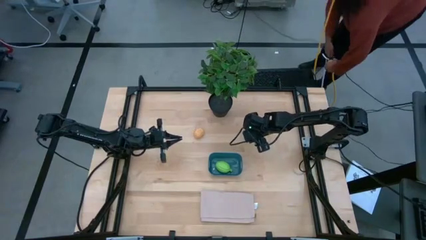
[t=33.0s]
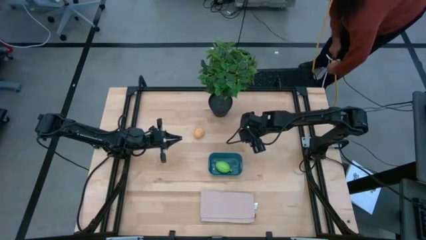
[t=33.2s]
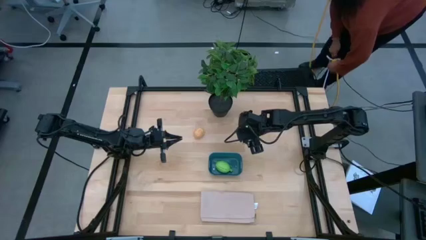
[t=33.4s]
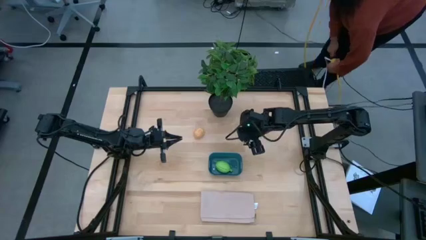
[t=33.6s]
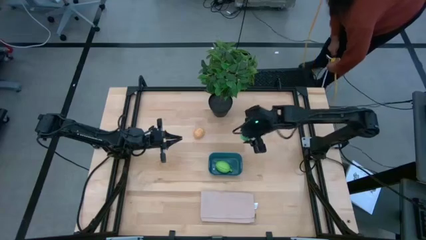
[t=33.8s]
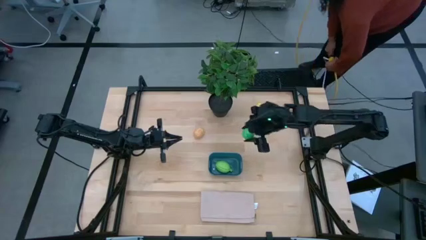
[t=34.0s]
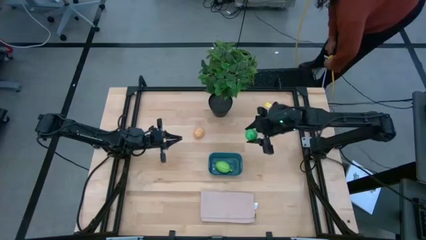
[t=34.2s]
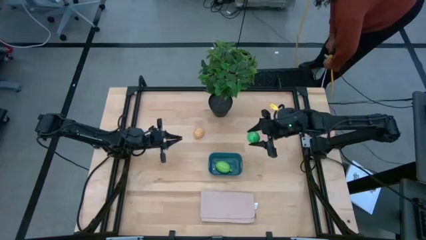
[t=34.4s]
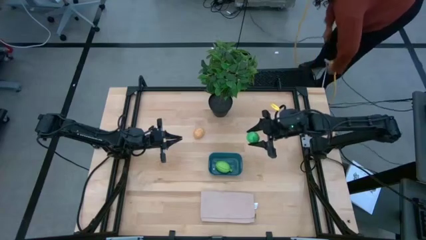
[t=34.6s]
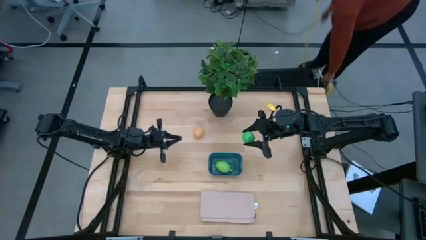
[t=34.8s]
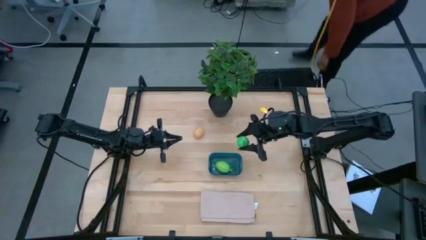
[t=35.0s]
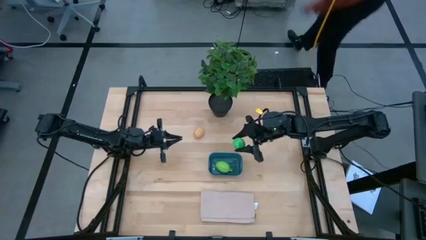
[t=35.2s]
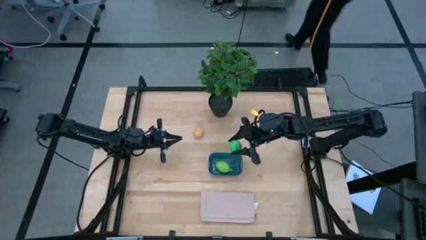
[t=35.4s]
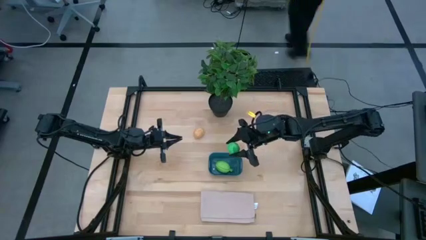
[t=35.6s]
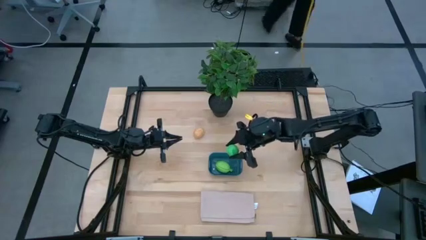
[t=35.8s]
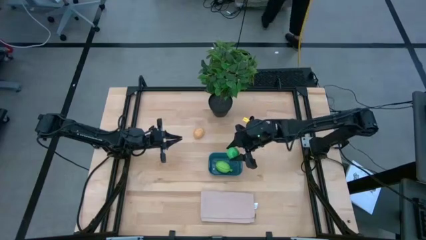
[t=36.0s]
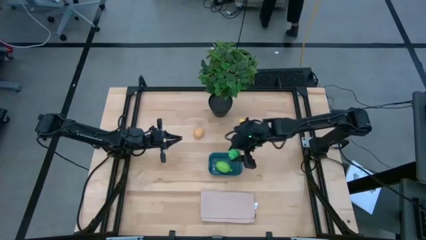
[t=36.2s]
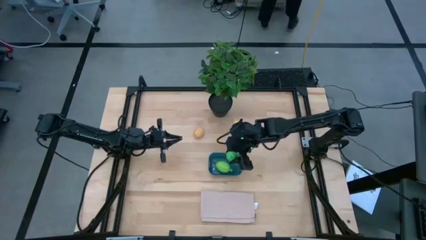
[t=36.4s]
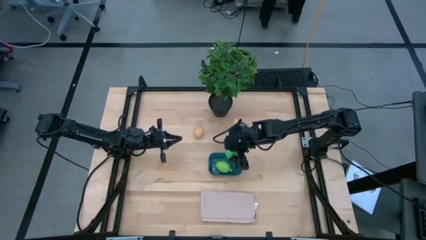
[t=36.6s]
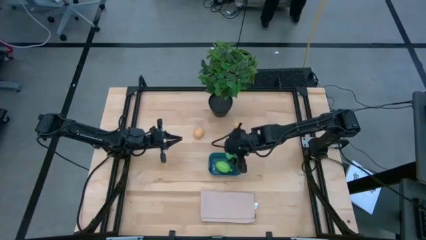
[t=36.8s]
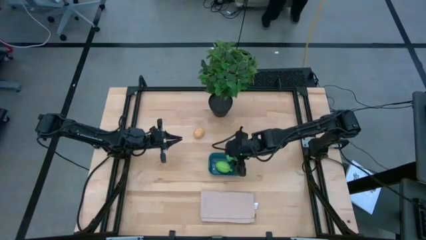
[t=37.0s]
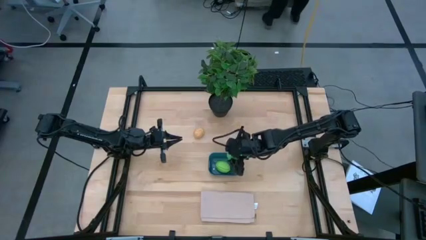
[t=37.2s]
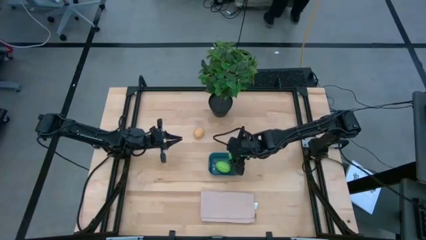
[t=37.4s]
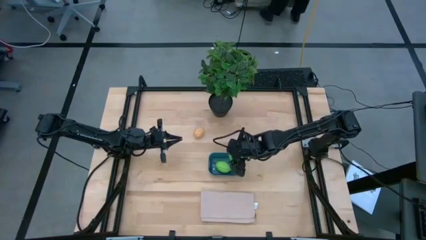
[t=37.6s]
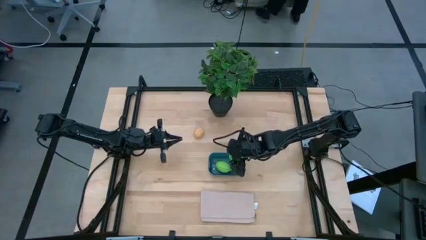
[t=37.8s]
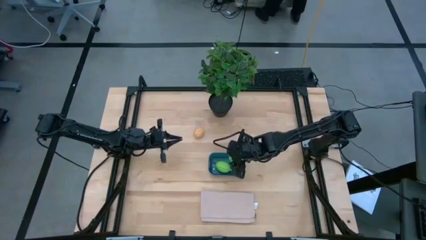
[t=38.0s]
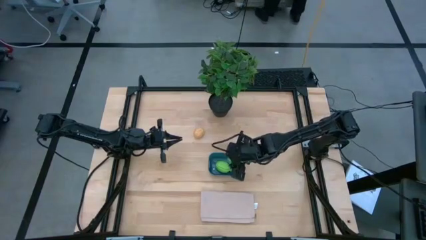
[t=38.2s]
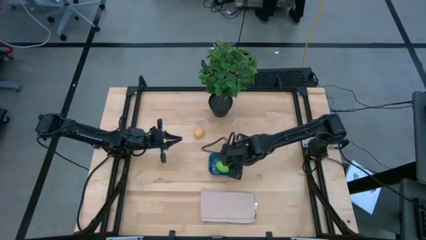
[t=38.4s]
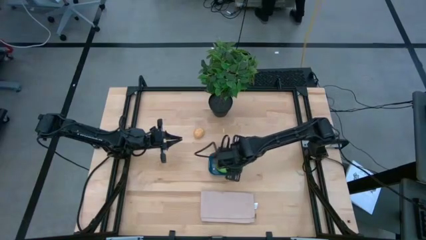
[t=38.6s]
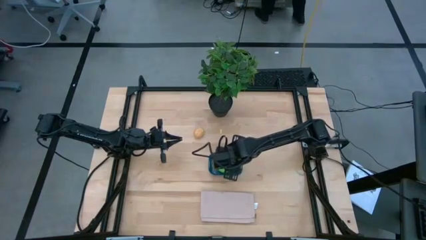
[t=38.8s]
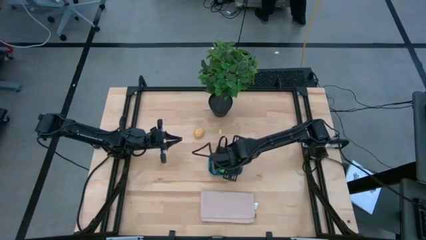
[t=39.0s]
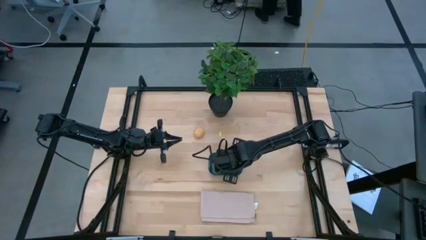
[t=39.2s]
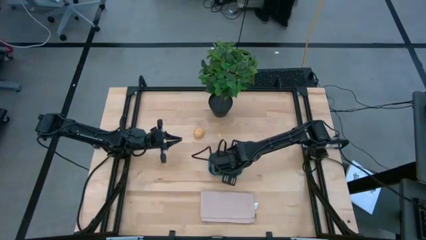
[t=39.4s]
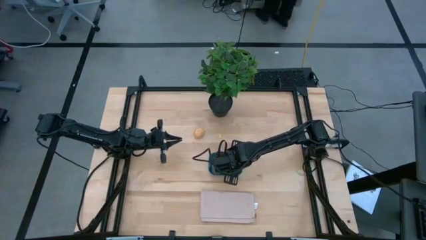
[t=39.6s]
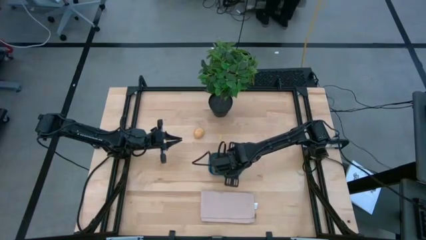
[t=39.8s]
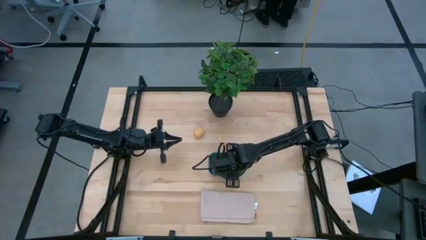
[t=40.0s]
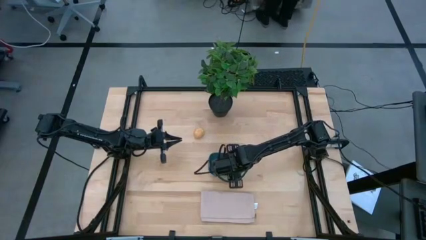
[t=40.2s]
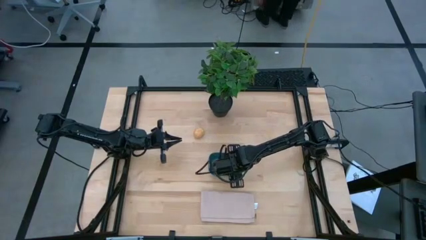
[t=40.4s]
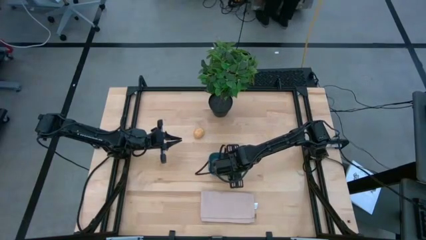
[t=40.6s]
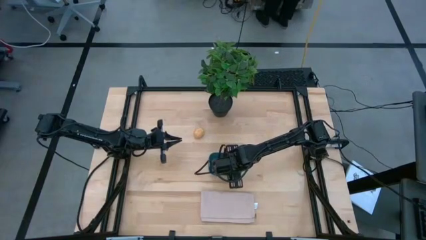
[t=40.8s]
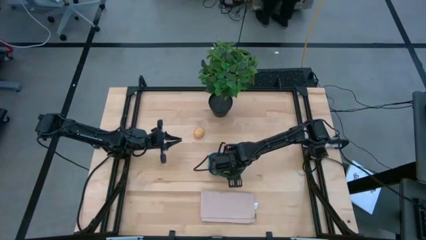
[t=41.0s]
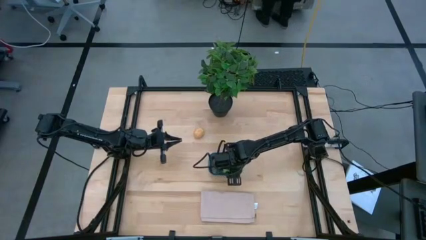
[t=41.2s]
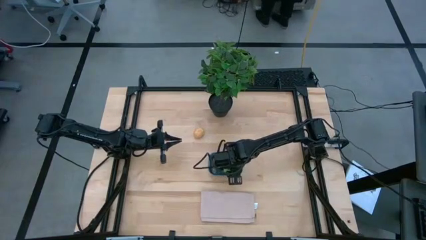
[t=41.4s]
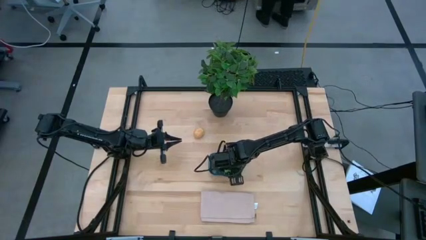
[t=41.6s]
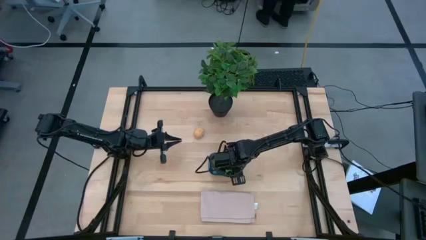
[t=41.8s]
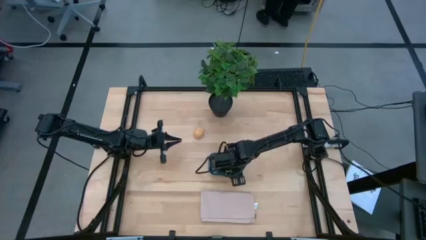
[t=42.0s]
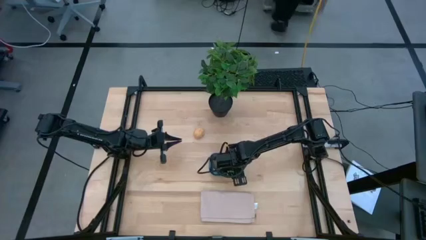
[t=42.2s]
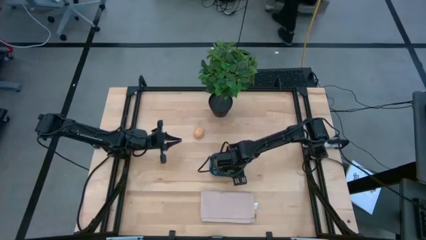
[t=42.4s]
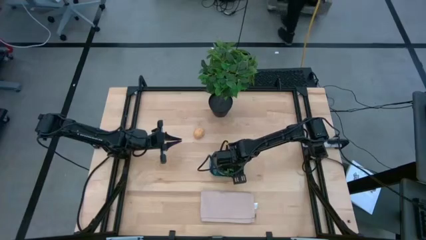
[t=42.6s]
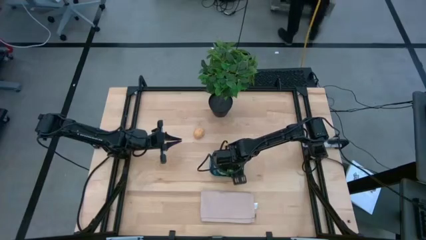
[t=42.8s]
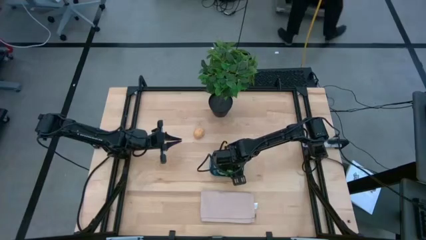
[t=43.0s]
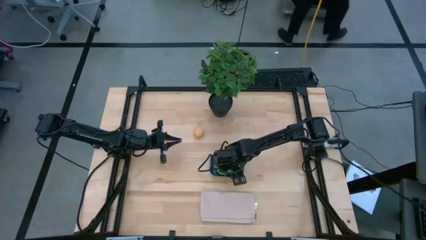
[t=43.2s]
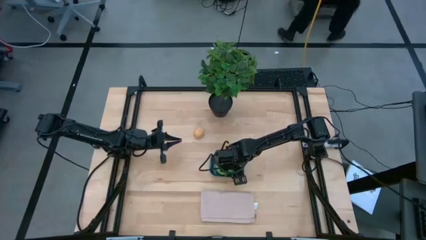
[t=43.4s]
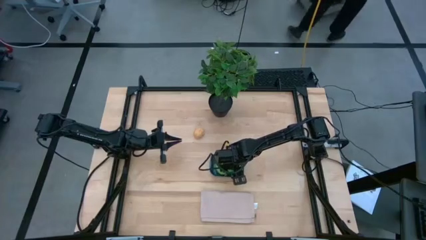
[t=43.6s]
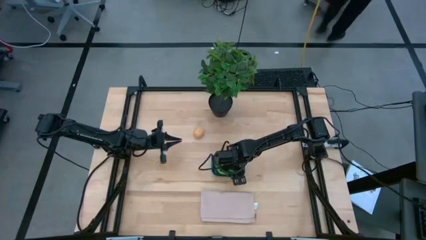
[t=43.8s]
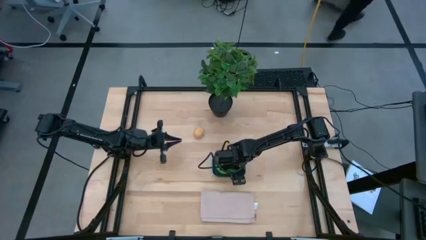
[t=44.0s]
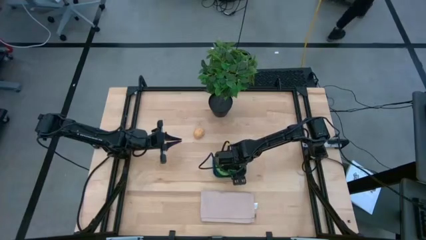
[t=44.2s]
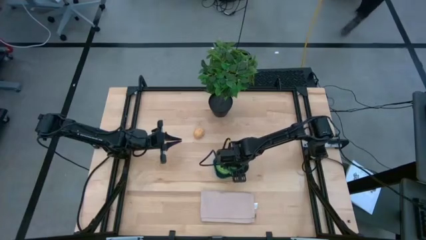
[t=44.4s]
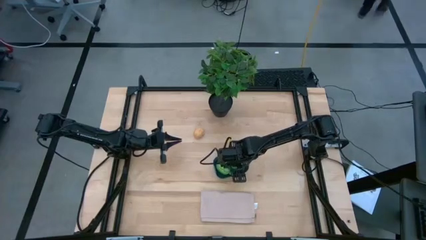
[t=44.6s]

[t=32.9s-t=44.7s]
Task: Pick and placing Produce into tupperware
Put the green pear into the blue bin

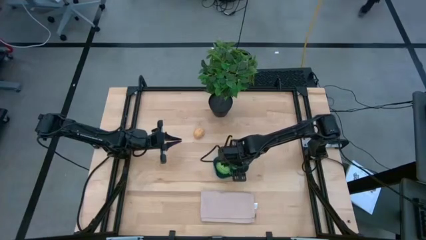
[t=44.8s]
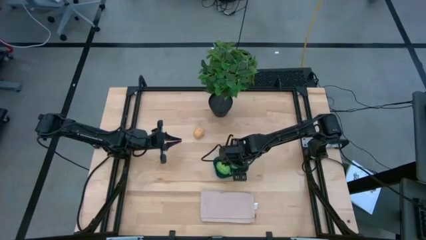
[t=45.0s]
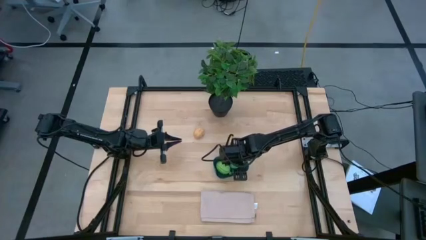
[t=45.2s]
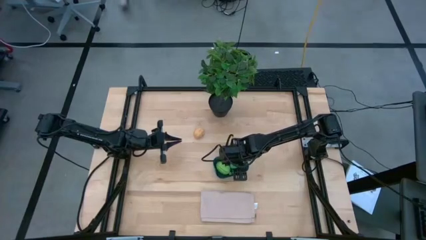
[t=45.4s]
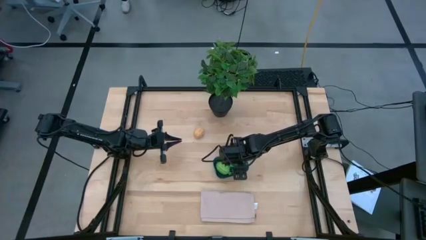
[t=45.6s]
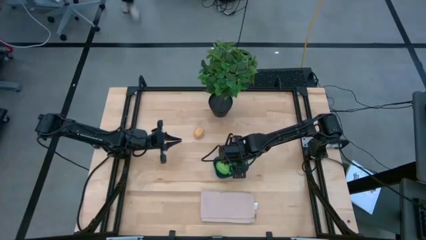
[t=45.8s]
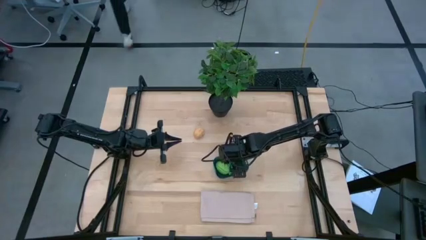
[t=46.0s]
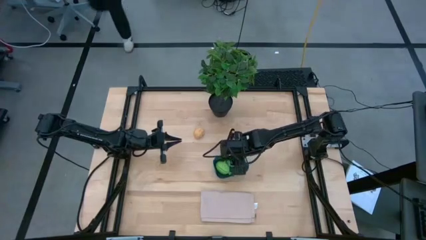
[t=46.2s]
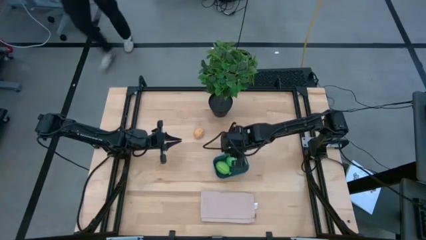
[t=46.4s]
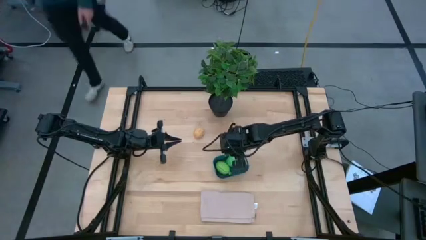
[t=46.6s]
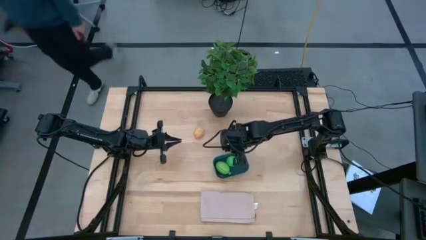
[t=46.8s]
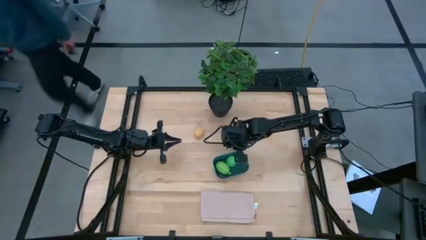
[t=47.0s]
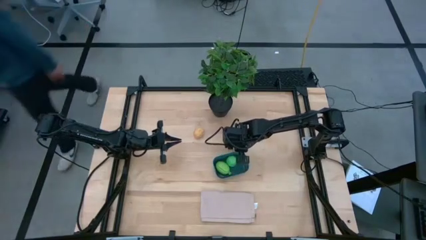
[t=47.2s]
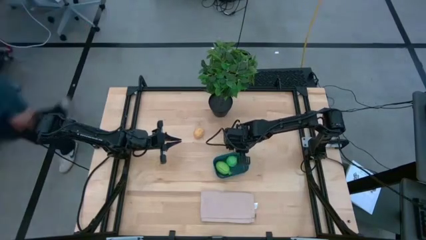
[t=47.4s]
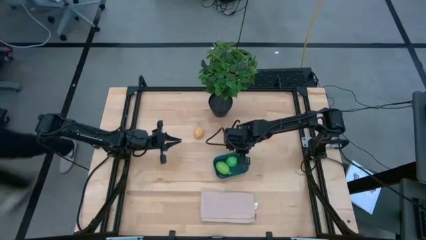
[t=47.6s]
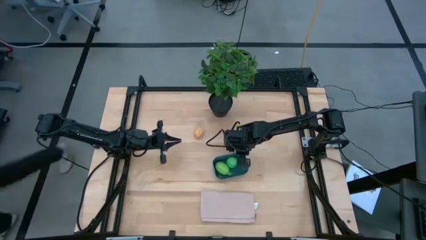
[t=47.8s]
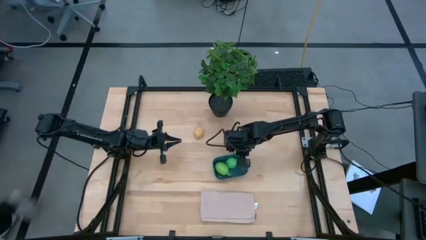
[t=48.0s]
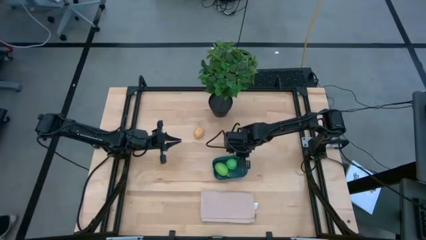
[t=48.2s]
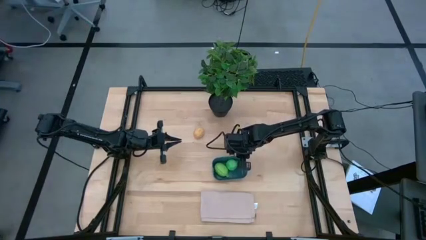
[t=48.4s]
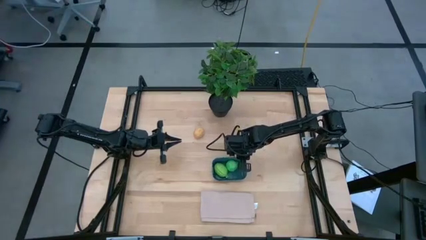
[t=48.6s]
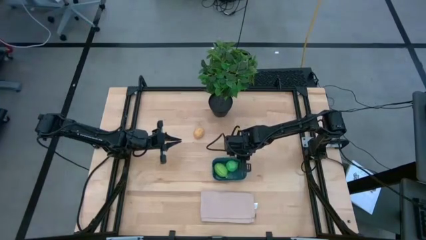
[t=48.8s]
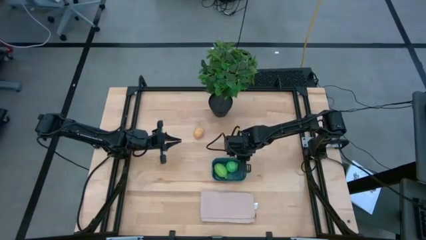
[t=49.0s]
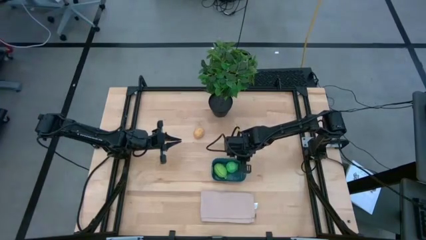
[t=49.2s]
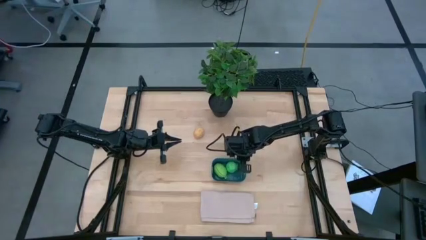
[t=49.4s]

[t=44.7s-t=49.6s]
Adjust the blue bin
